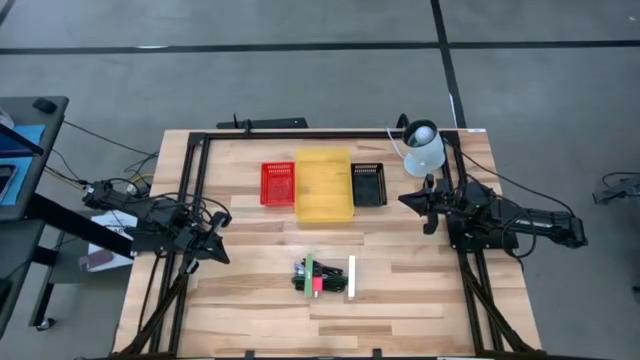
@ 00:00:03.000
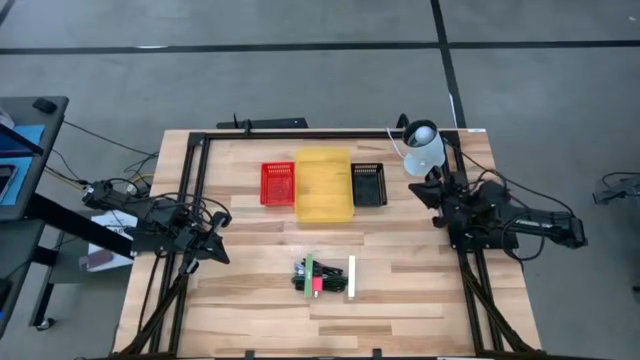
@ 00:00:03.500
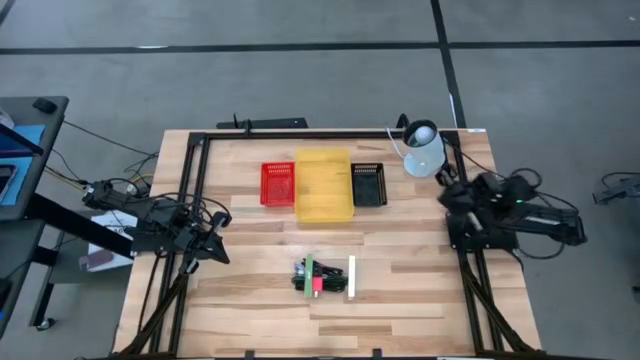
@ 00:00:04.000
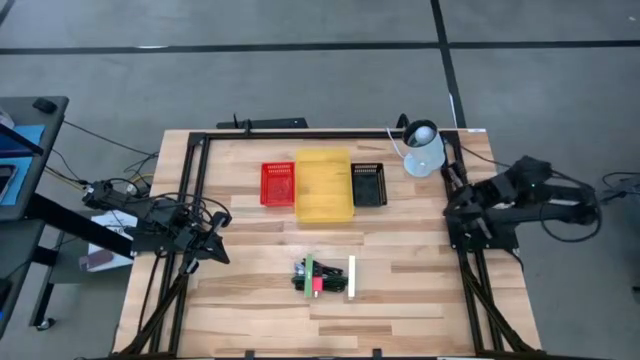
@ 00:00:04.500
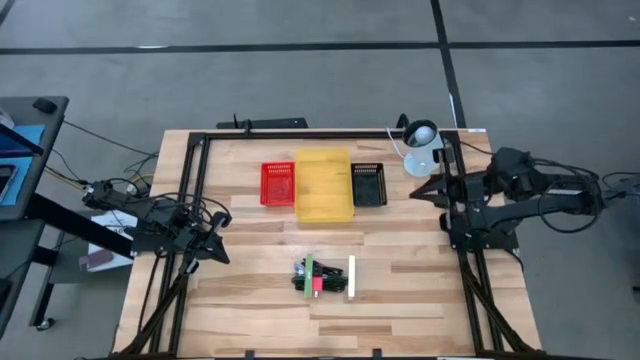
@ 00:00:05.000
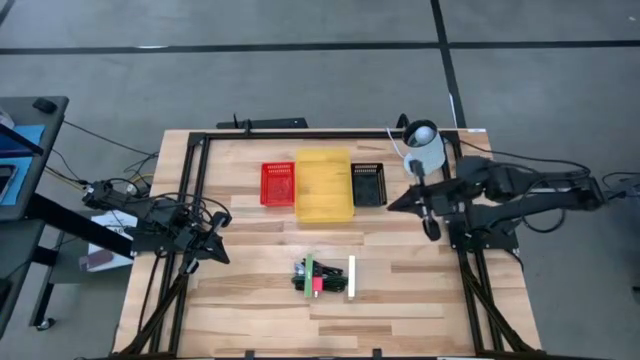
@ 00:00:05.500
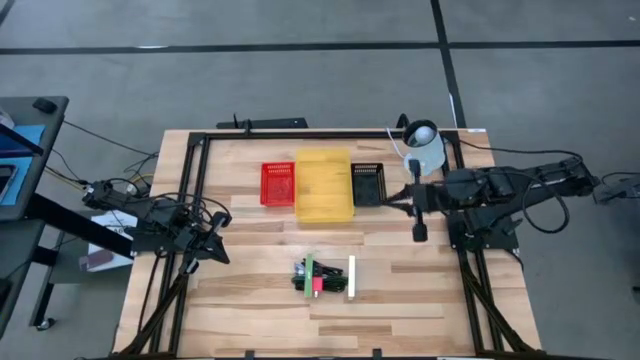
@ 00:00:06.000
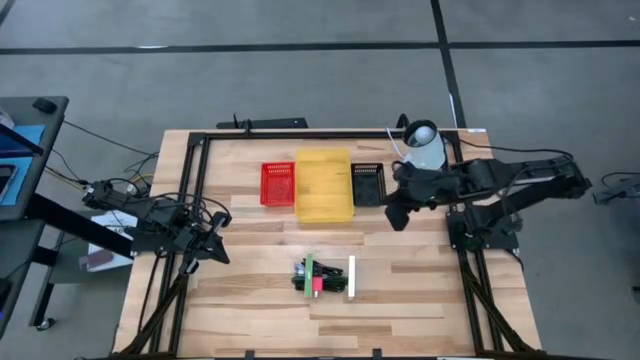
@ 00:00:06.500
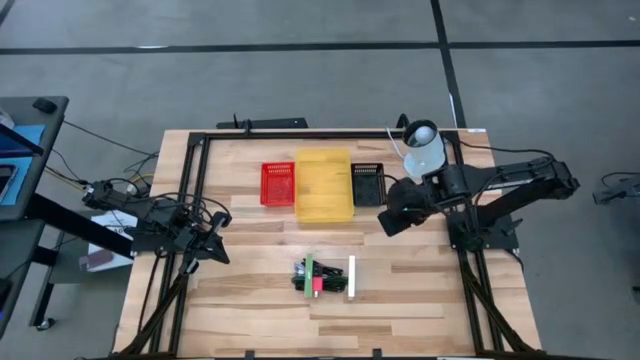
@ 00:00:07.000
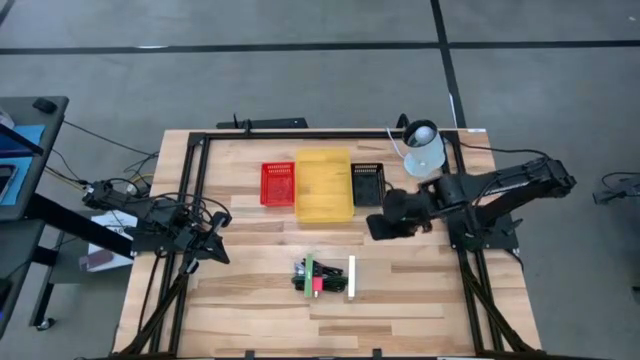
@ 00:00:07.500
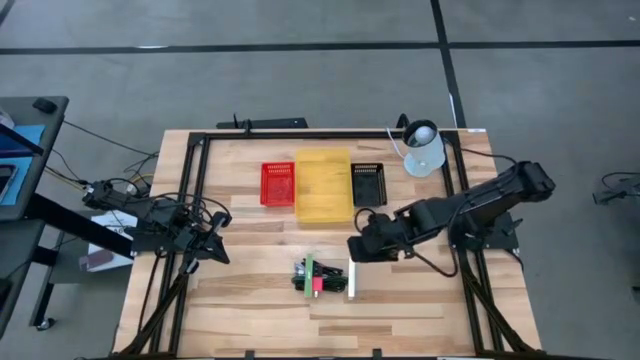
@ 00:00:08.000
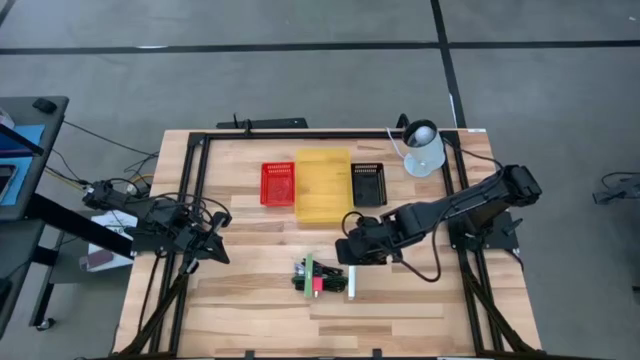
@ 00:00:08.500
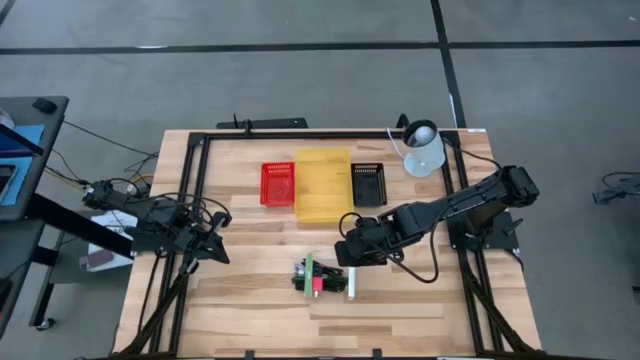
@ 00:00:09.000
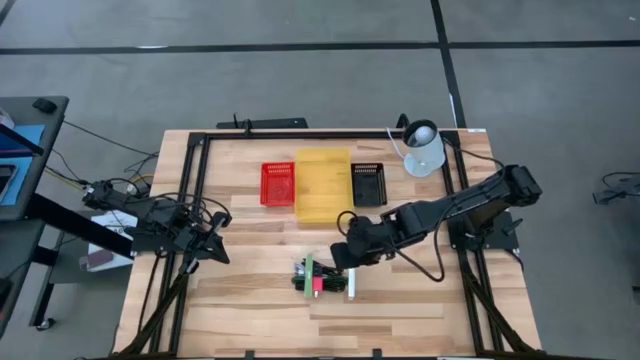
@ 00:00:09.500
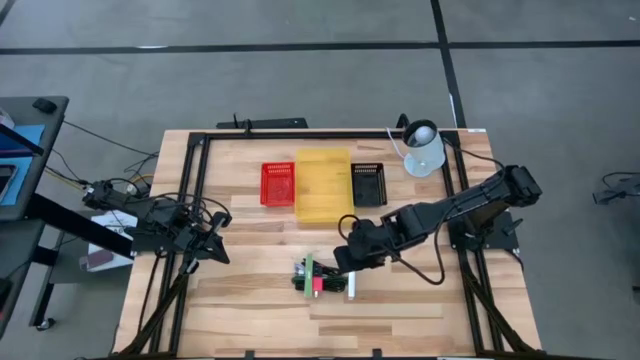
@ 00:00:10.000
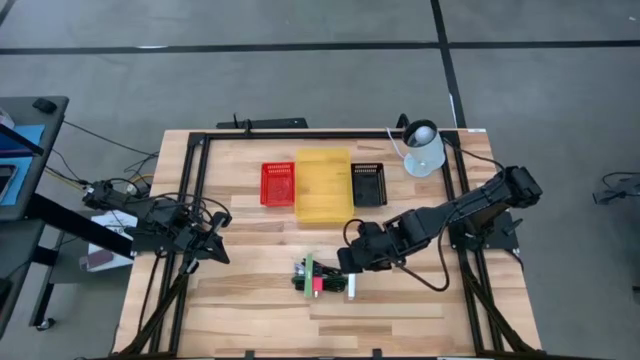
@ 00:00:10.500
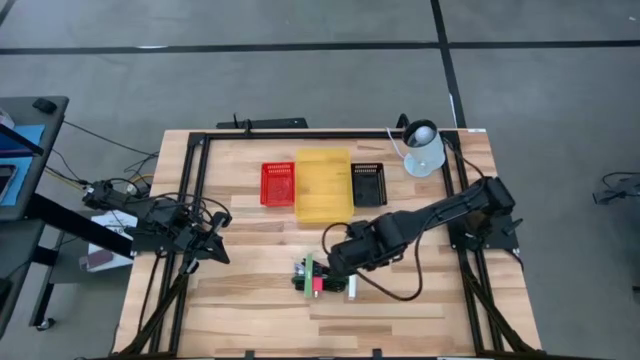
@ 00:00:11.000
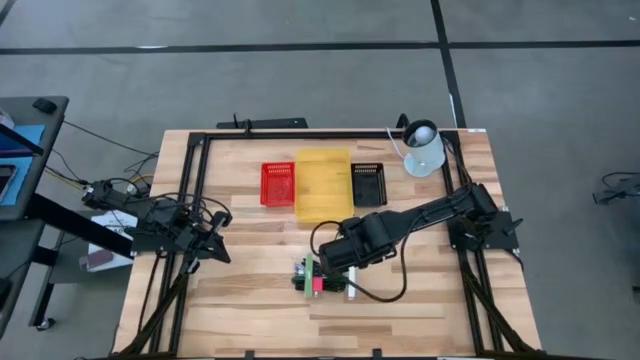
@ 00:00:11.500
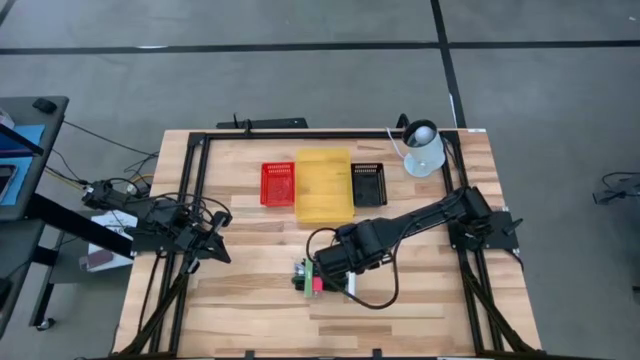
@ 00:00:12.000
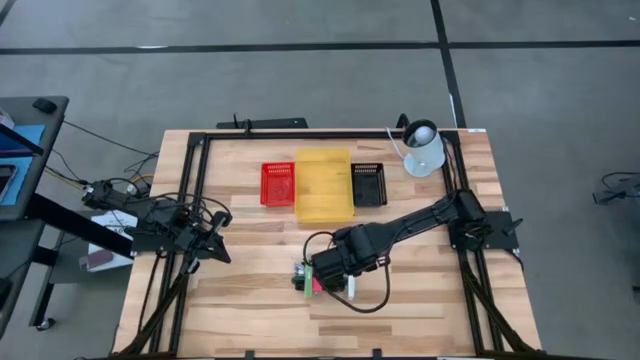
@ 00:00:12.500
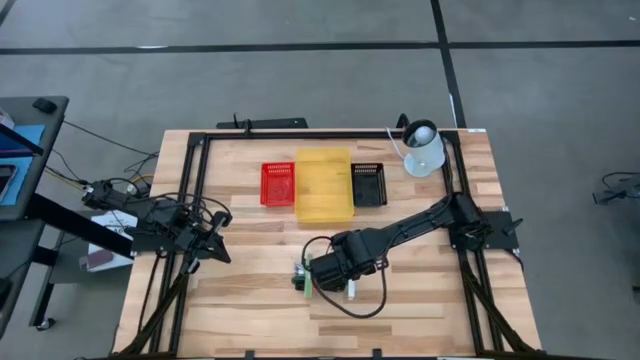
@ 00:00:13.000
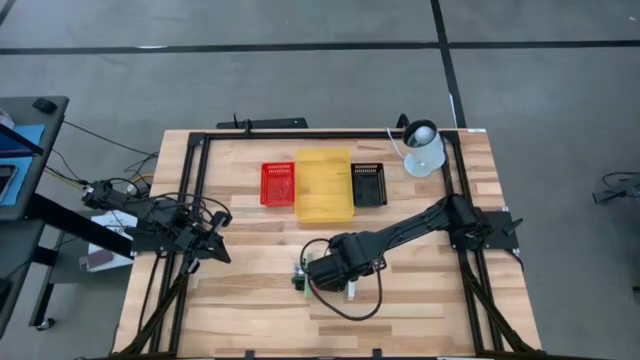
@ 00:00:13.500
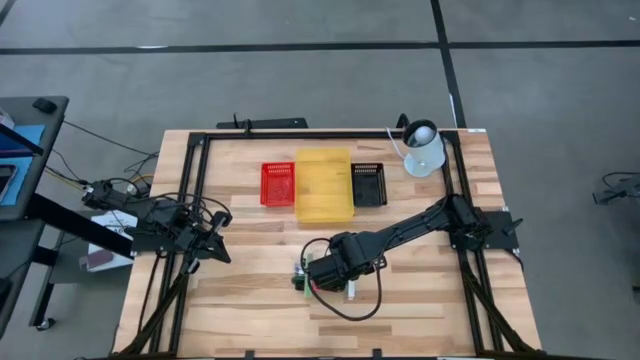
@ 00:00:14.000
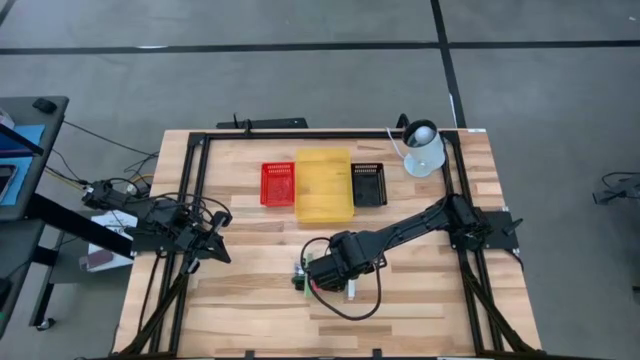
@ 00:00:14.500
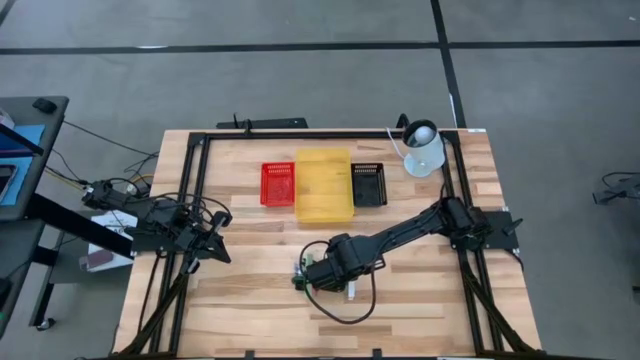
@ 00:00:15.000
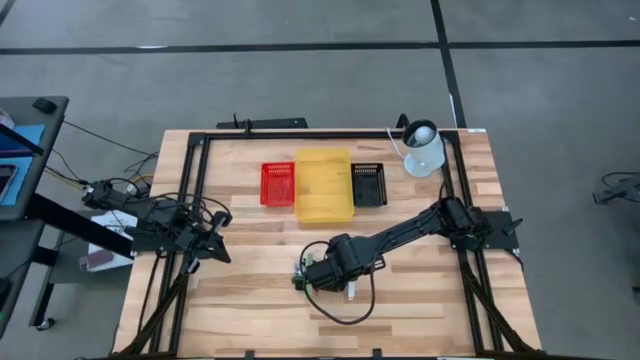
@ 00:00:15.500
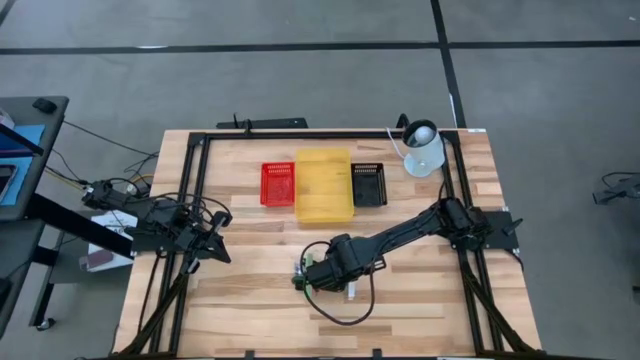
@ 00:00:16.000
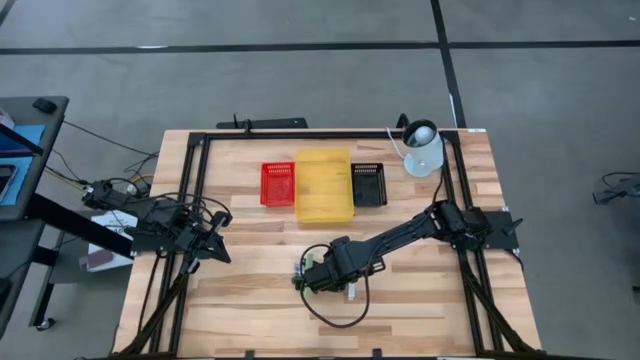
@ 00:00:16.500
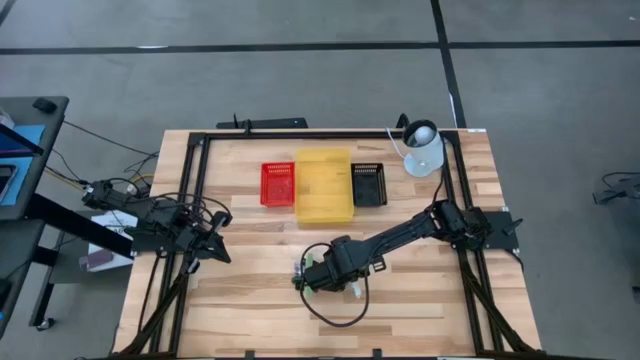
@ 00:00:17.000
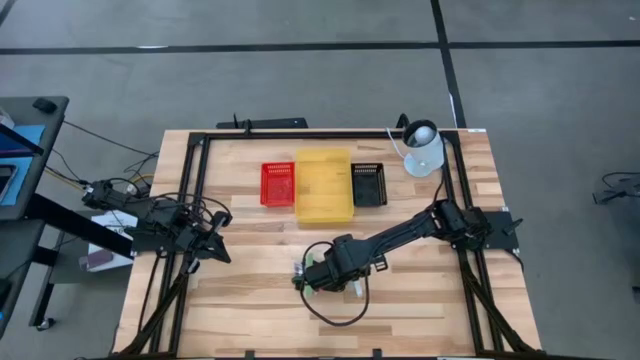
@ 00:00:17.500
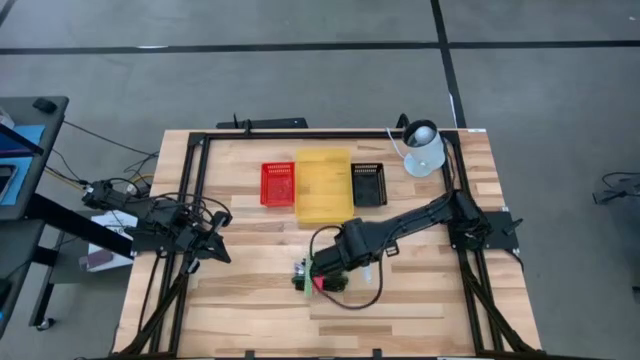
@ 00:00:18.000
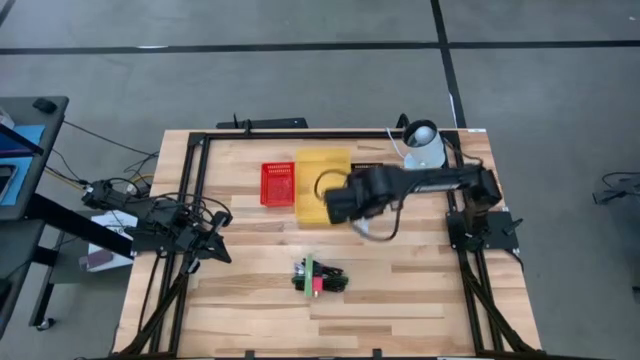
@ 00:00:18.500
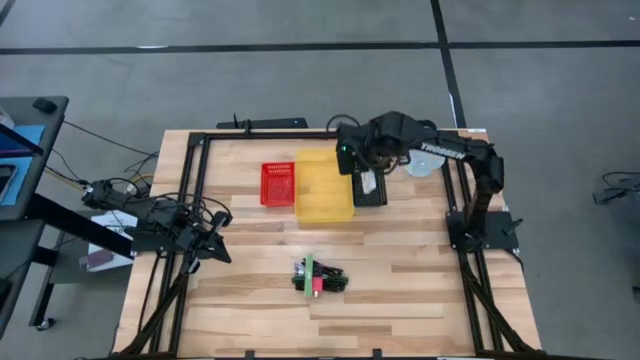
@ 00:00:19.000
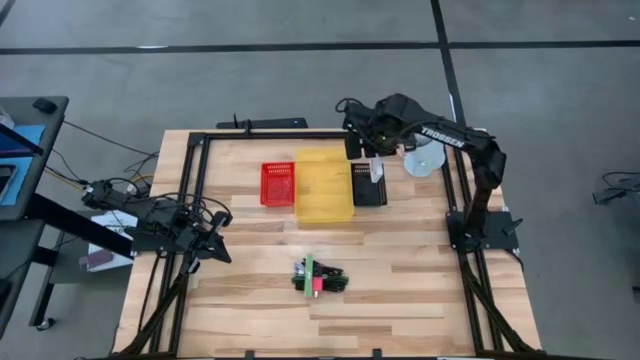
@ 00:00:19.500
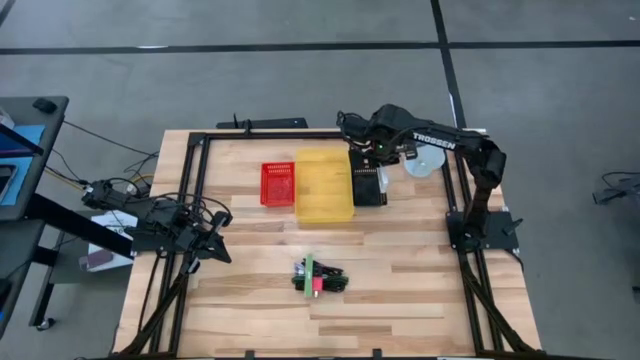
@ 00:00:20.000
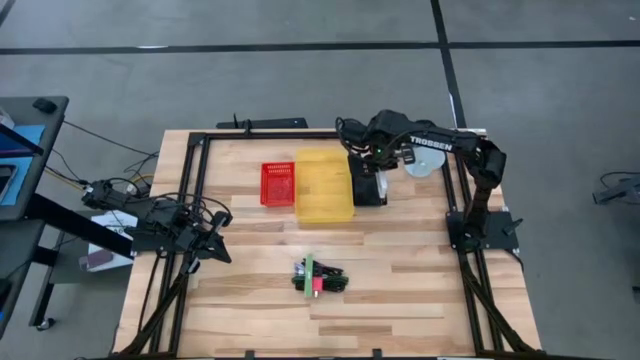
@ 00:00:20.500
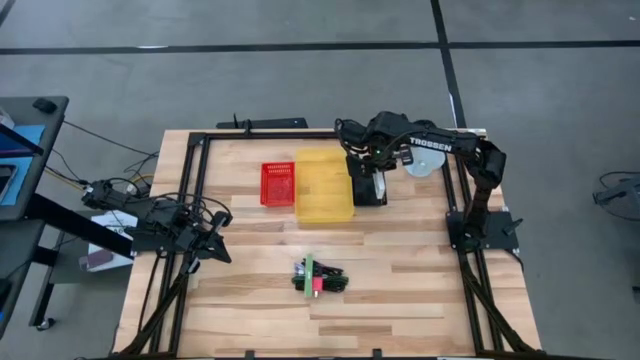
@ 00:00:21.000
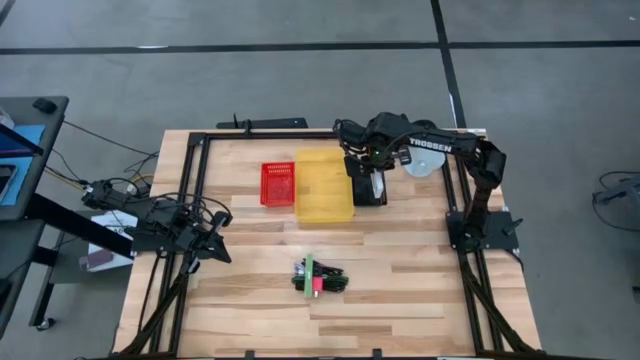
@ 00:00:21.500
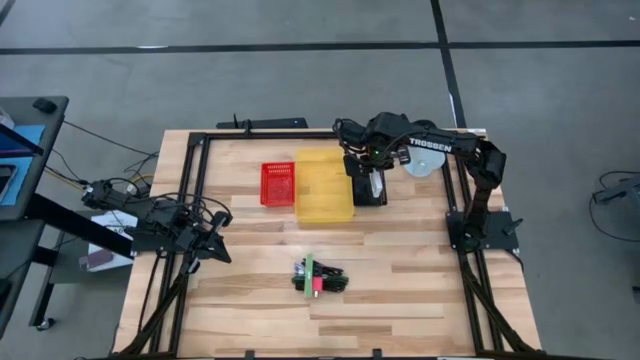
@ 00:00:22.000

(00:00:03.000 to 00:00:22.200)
Task: Pick and place items into bin
Put the white box into the black bin
